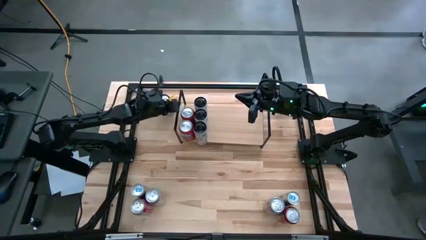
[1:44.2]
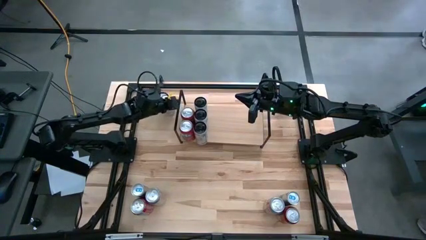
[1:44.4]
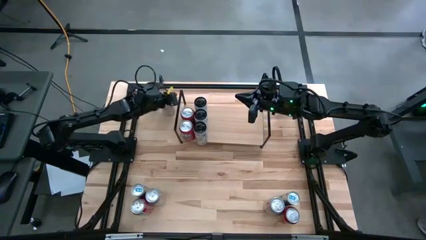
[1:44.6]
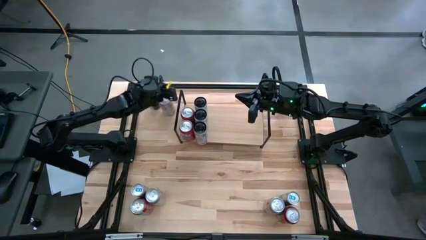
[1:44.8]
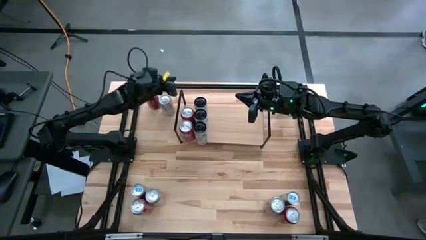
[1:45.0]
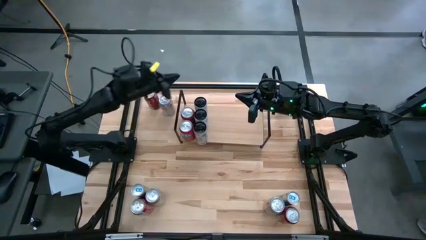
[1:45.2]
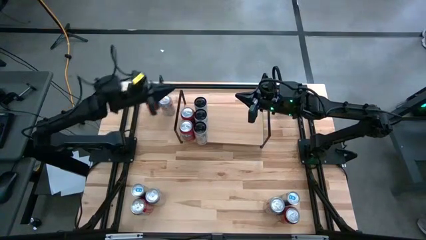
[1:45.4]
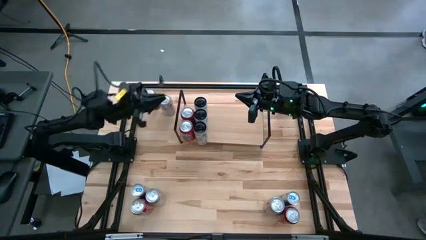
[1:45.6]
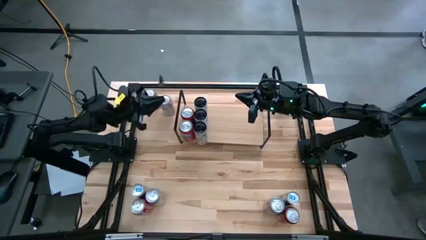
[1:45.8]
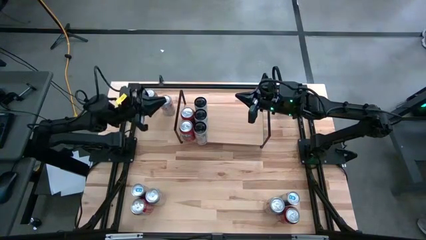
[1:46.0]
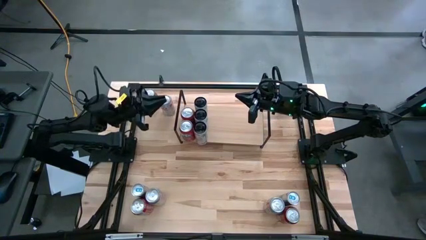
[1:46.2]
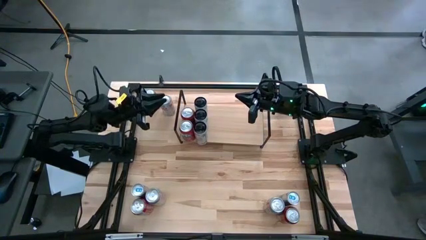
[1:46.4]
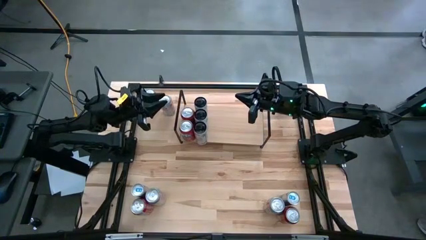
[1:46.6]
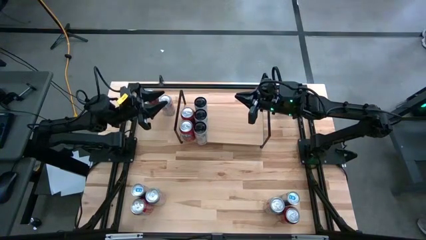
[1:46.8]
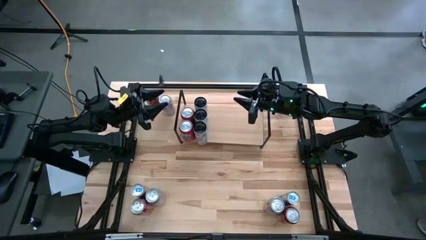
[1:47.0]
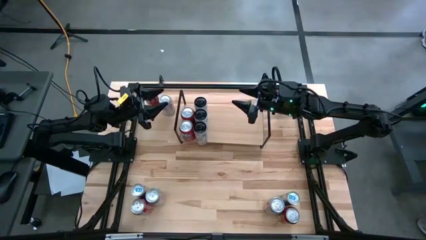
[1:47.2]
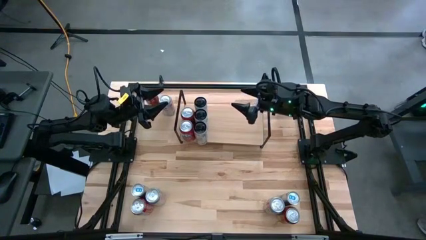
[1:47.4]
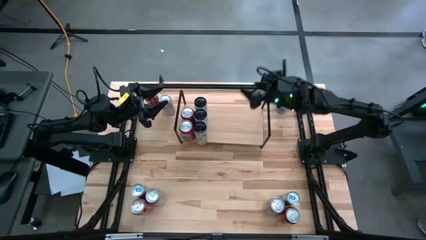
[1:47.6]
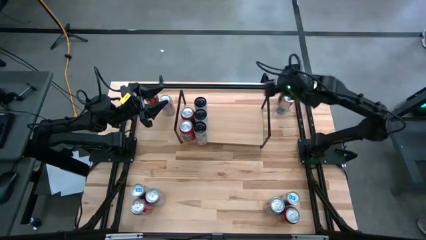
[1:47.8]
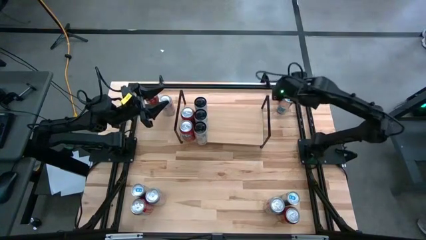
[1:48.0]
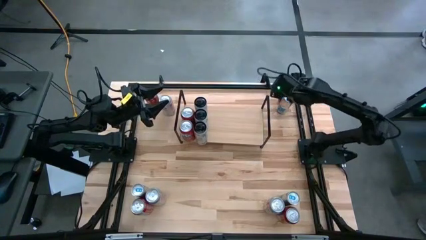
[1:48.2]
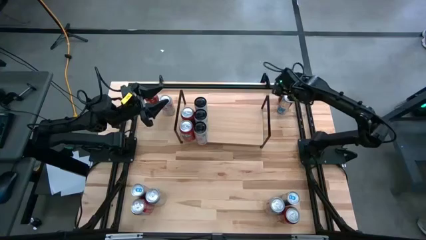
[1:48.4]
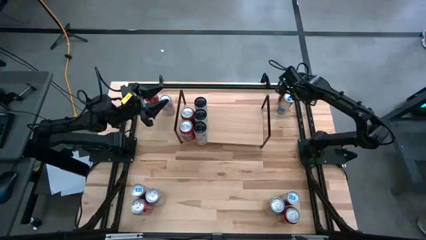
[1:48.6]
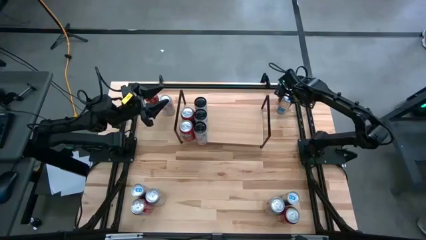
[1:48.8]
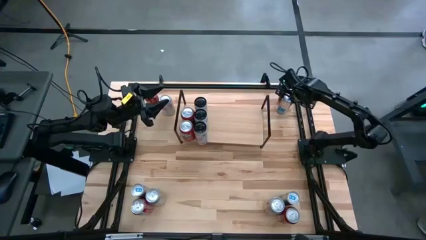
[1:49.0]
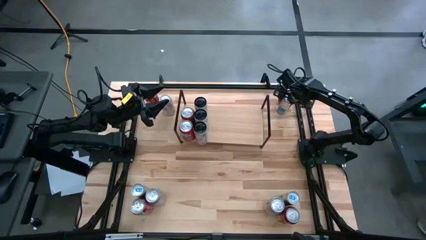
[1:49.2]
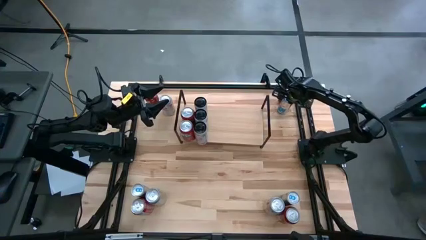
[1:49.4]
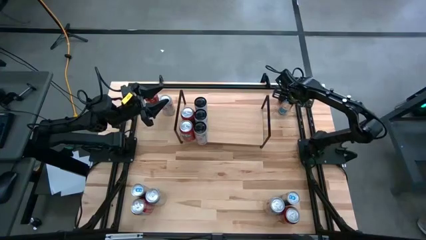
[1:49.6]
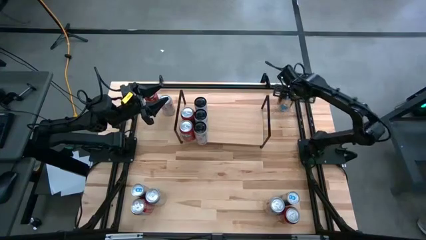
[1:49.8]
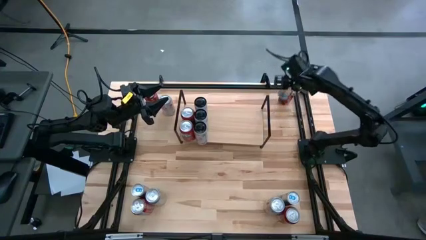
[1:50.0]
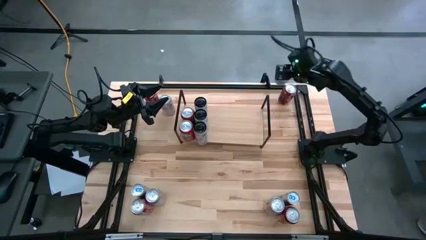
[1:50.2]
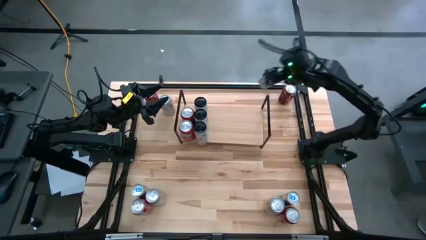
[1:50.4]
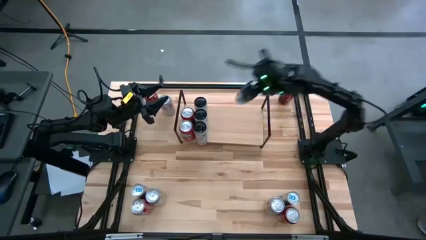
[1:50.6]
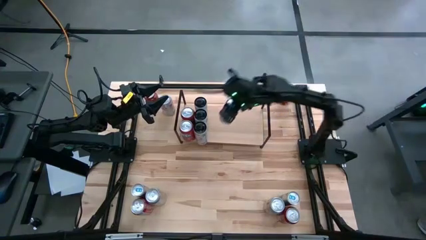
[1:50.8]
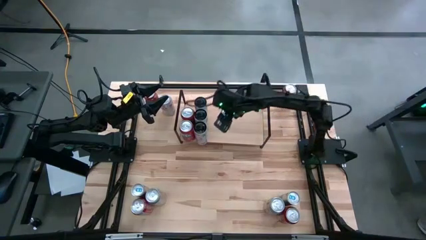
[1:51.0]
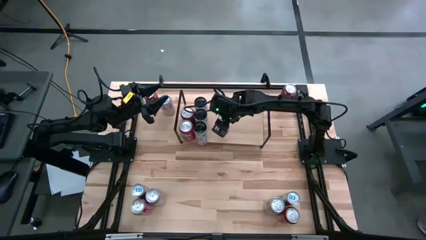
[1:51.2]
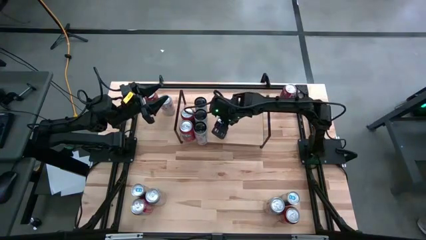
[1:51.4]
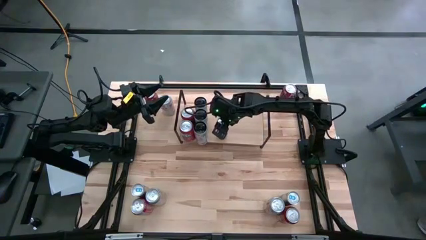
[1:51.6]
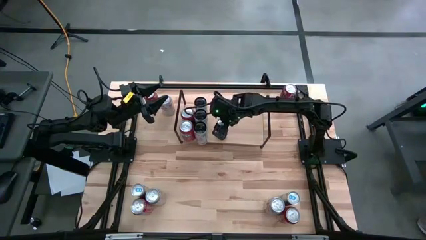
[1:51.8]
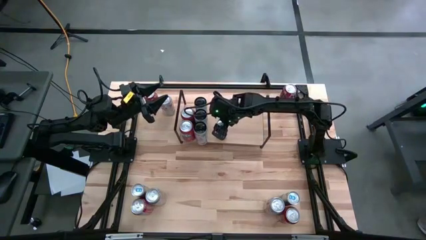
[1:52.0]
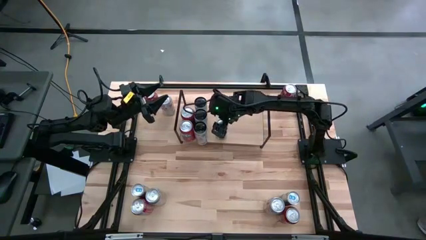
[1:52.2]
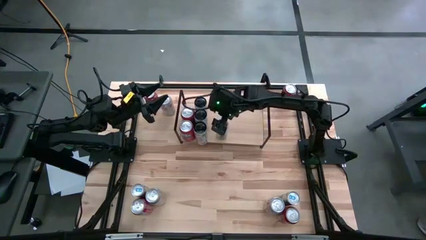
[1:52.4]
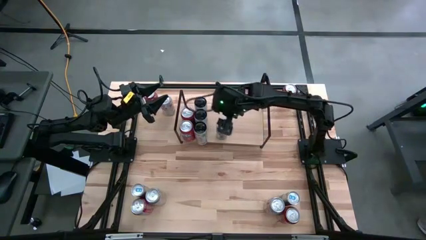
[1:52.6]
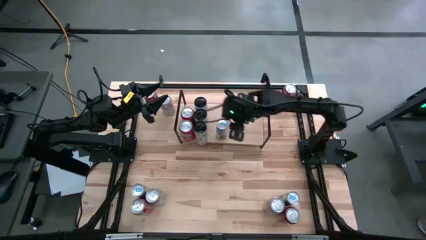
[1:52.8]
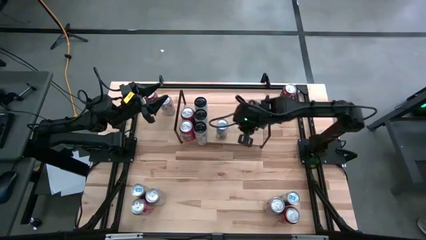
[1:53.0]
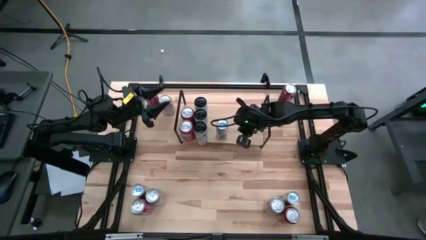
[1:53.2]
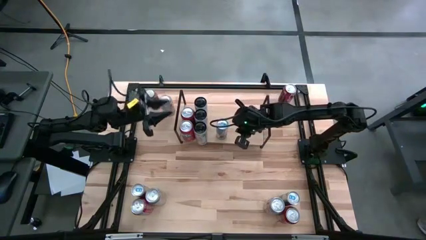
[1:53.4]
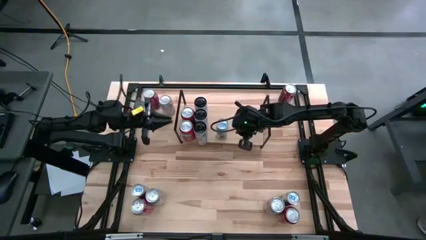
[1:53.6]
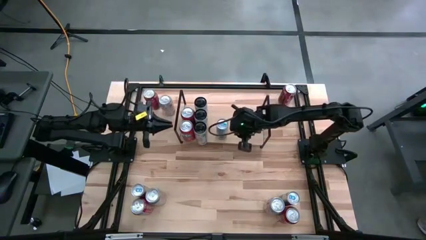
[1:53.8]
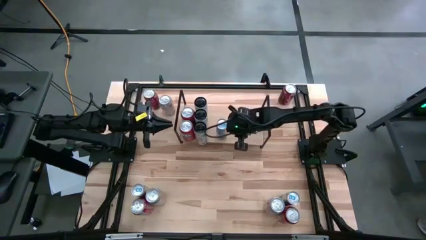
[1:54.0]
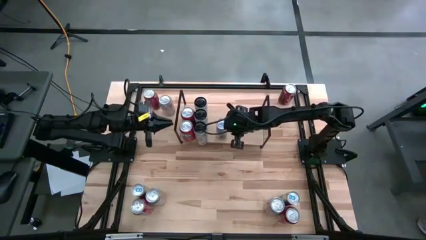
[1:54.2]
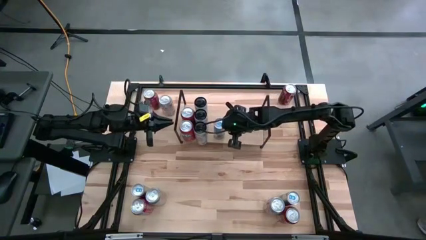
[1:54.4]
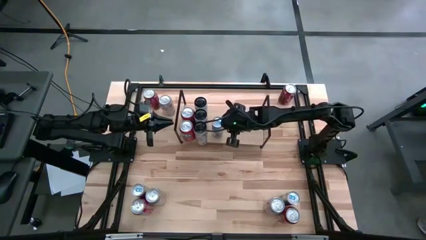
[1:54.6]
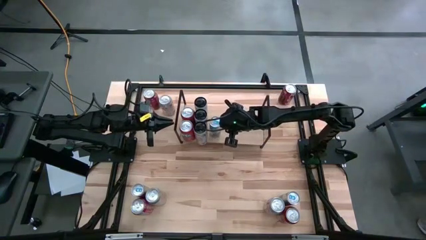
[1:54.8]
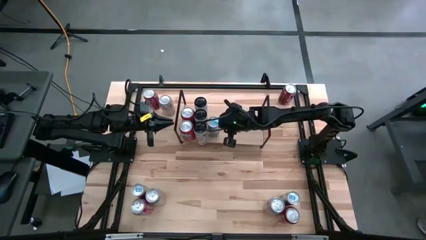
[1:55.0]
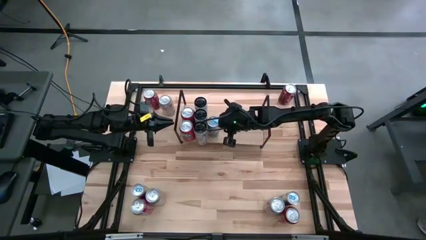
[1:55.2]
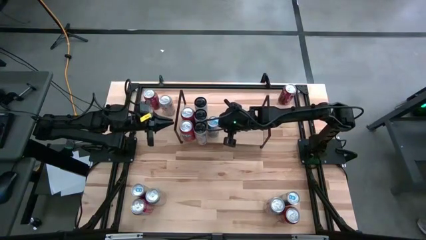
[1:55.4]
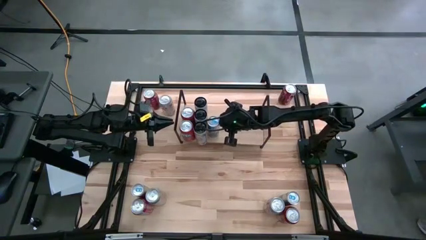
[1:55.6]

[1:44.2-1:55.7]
Task: Place canned beverage on shelf
Put the top right blue soda can on the shelf

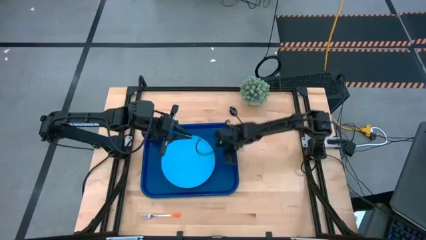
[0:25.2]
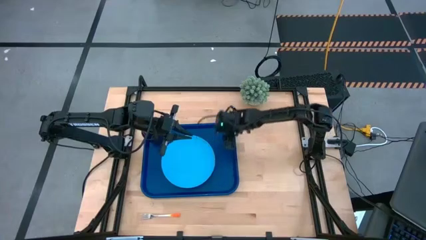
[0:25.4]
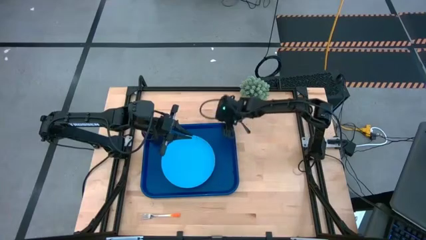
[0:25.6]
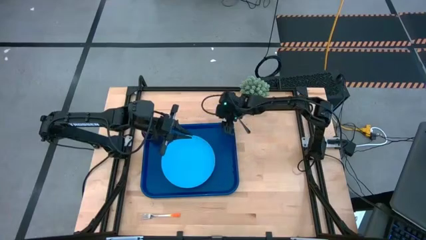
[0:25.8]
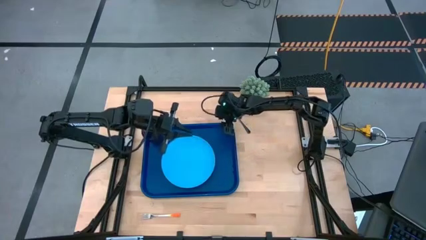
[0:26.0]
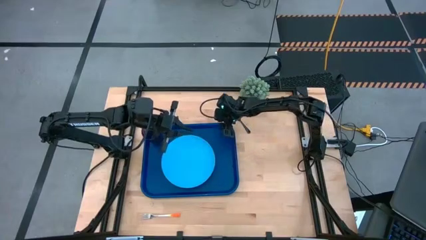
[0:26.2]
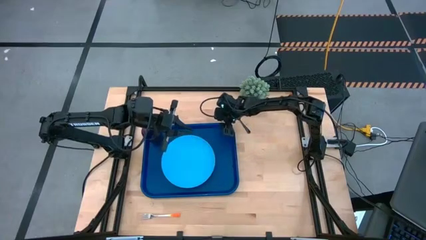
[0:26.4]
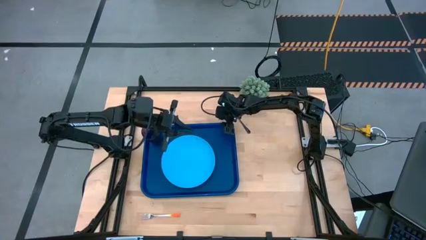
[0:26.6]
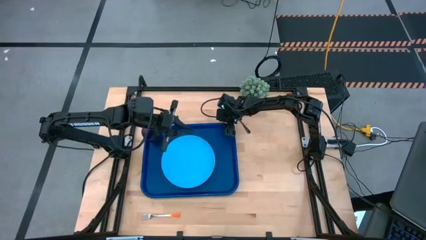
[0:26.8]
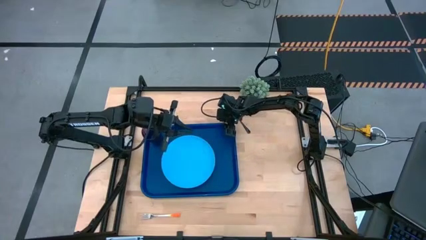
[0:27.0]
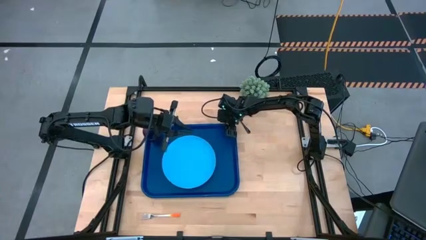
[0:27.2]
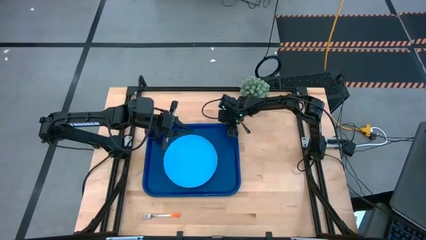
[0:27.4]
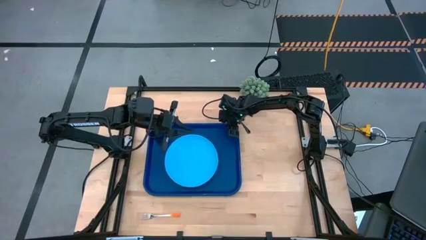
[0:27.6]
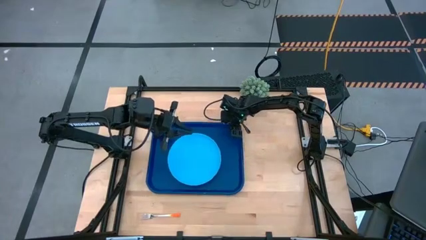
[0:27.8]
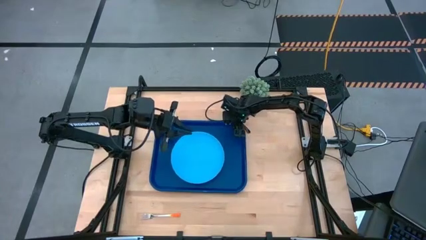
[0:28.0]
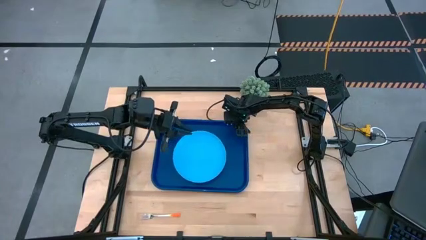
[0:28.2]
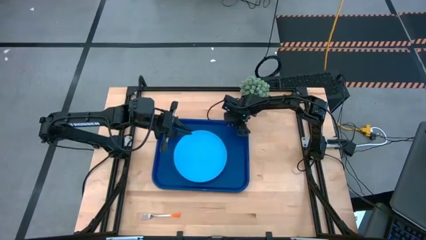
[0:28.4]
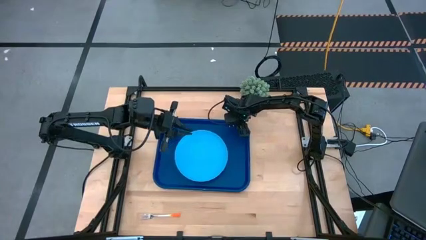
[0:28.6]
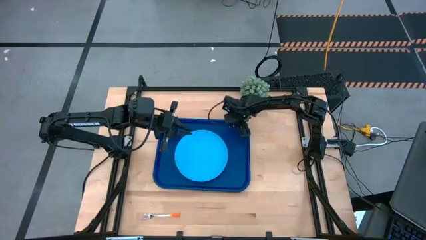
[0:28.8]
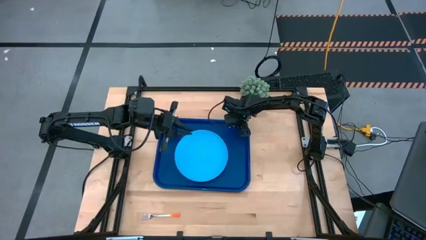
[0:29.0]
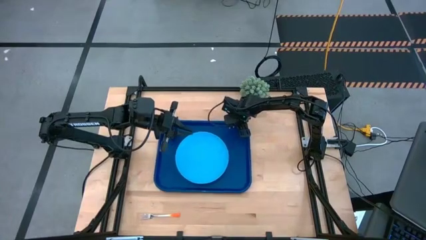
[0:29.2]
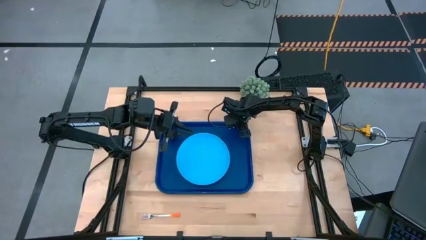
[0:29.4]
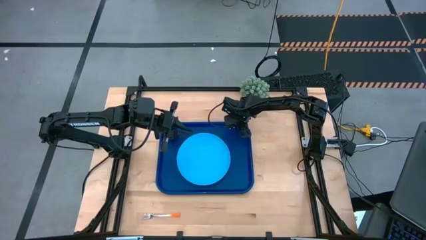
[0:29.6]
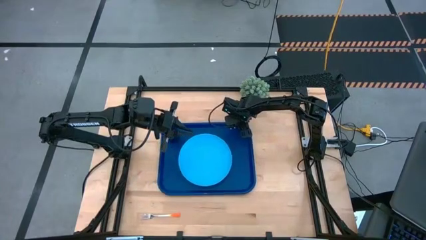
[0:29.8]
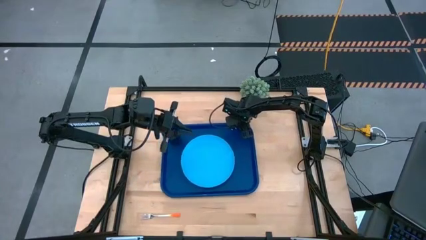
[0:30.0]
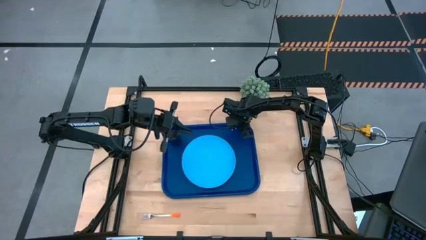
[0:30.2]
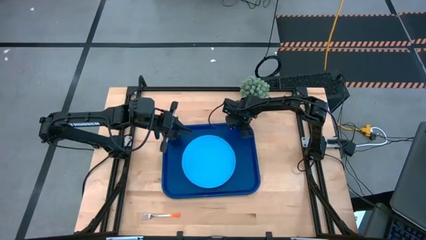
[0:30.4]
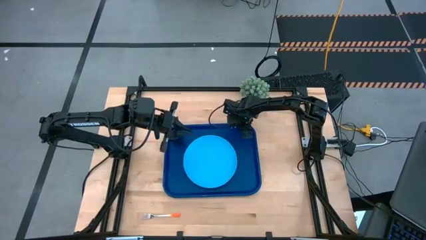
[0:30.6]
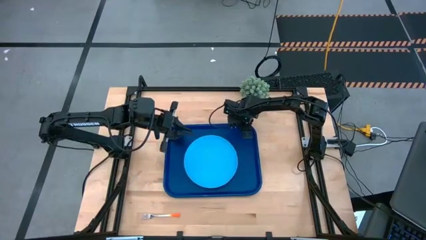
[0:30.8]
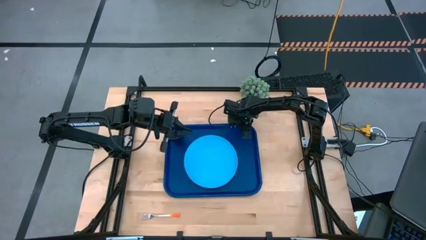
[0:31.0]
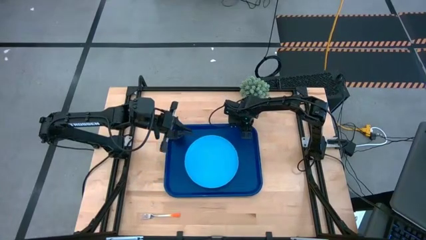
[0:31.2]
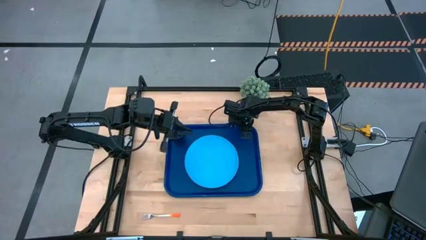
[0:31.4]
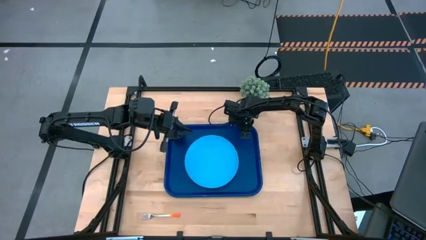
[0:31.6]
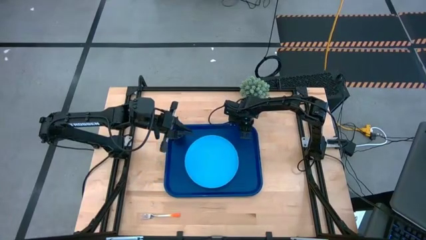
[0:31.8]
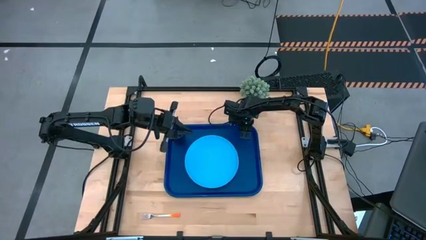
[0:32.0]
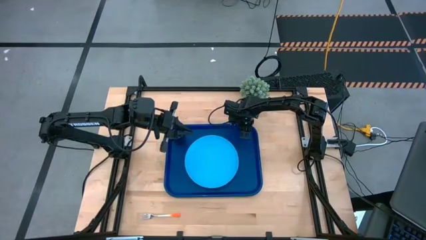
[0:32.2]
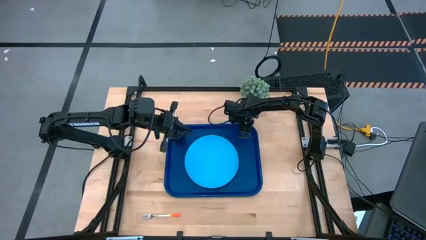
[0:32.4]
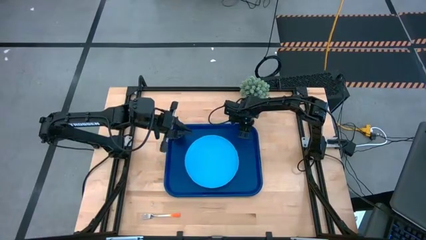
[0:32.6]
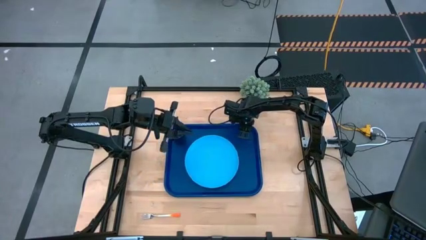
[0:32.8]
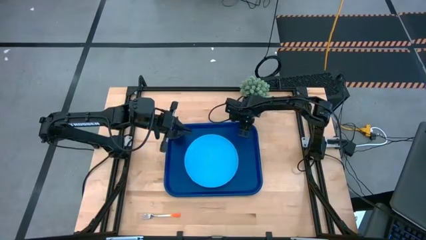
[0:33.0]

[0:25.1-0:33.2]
Task: Pick and place plate/cup/fork/spoon on tray
Adjust the dark blue tray
